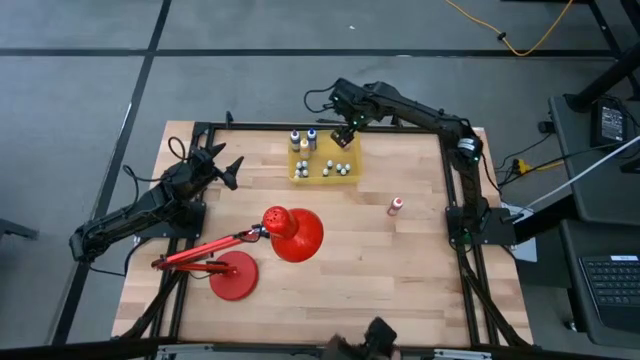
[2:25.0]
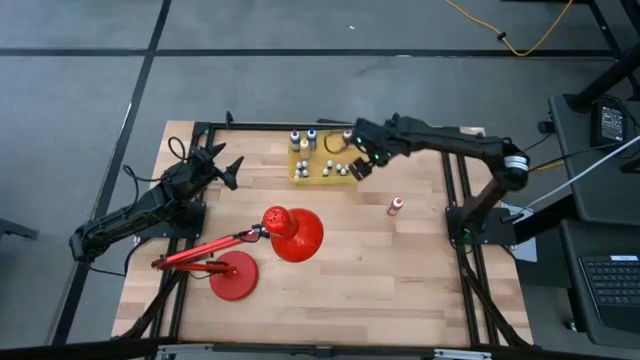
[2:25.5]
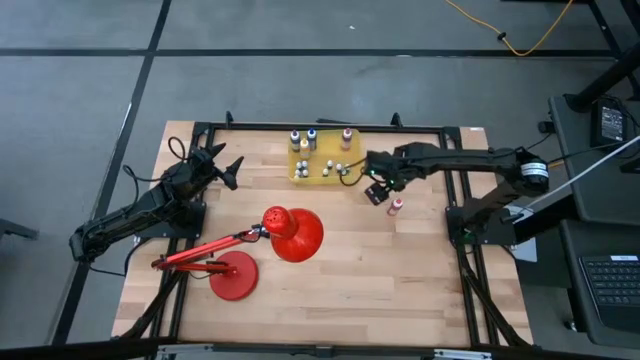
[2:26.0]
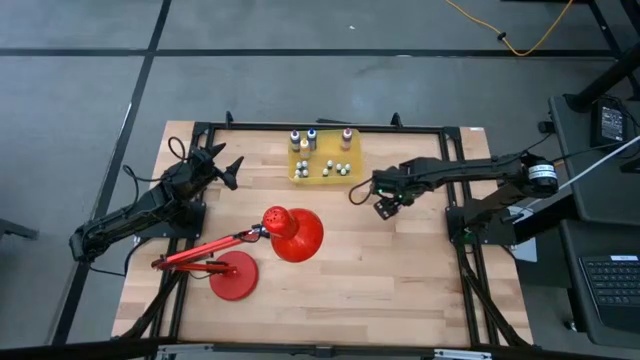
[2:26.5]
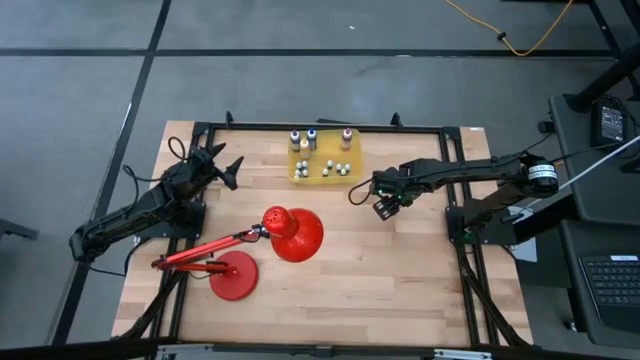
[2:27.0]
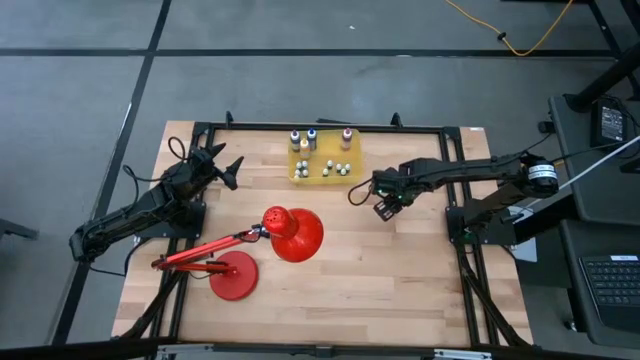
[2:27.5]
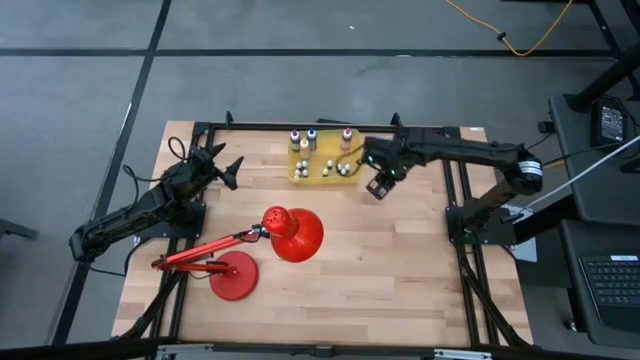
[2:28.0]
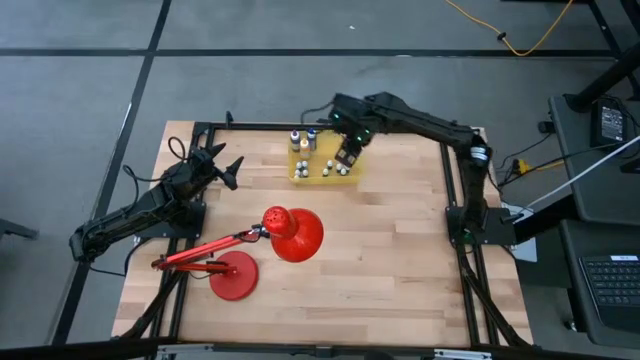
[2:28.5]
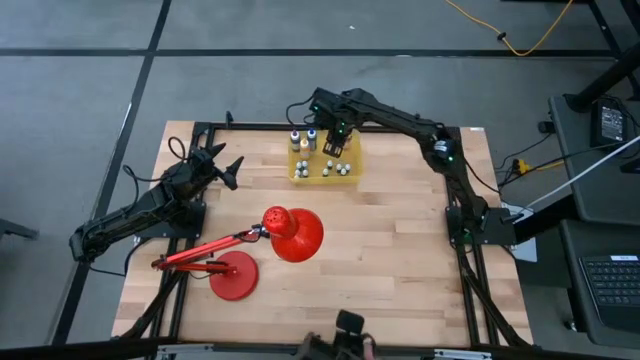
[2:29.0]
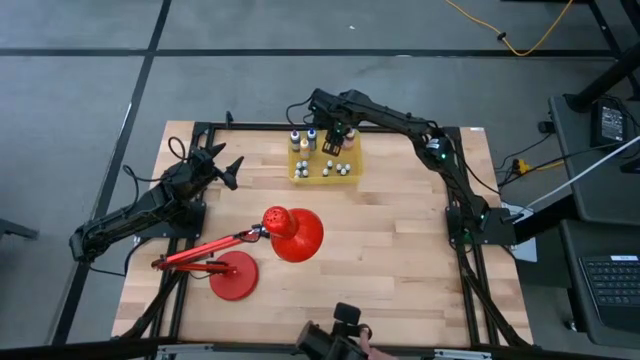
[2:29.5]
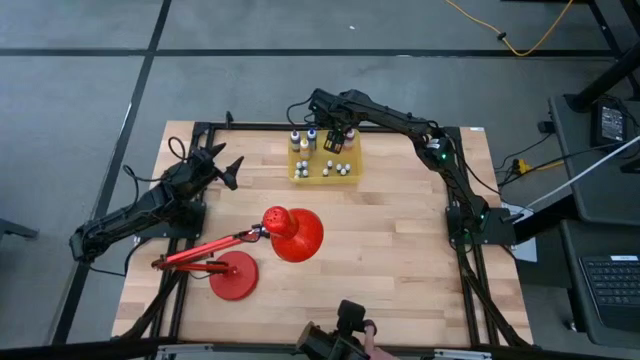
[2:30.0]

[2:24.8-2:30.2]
Task: Pick & Place food coloring
Put the orange food coloring bottle into the yellow bin

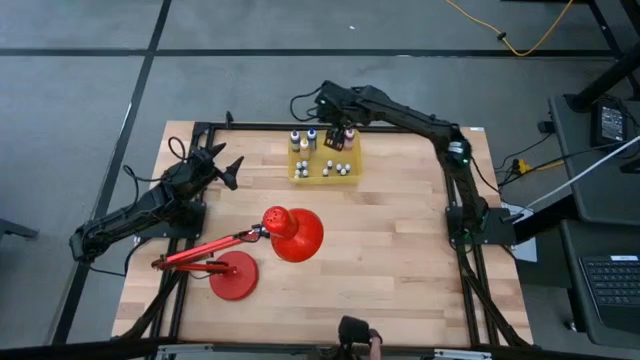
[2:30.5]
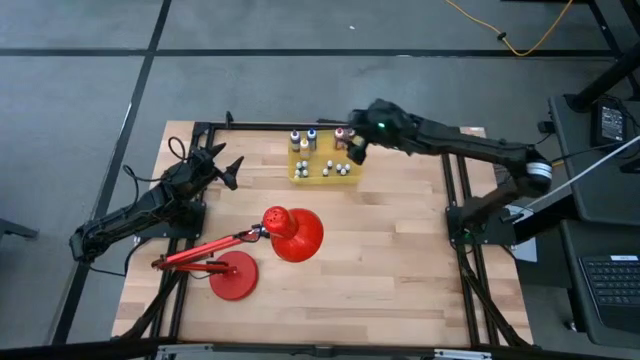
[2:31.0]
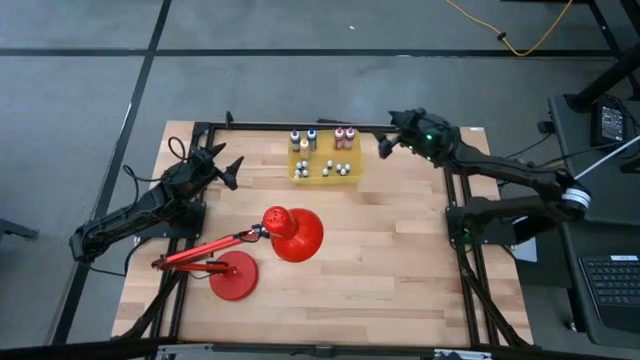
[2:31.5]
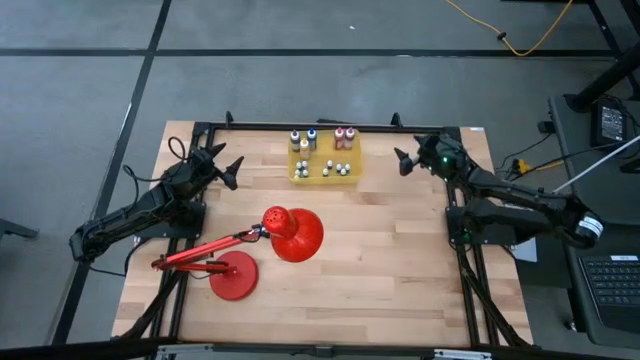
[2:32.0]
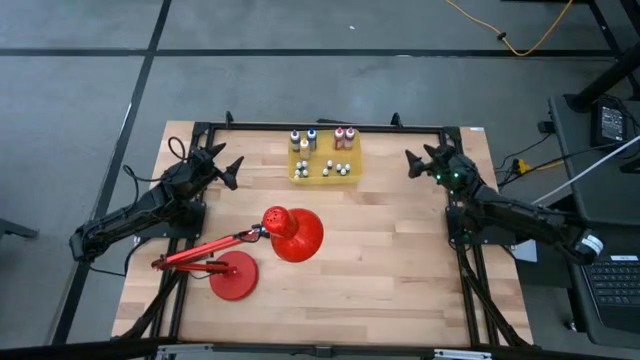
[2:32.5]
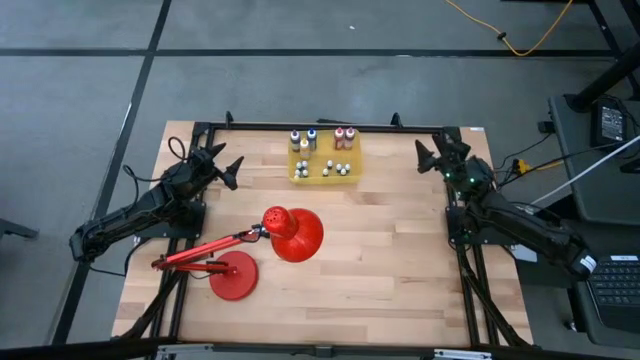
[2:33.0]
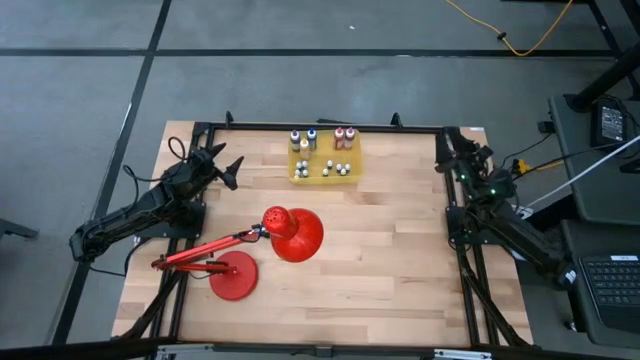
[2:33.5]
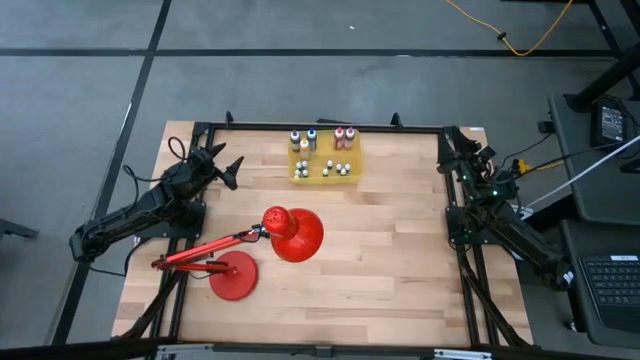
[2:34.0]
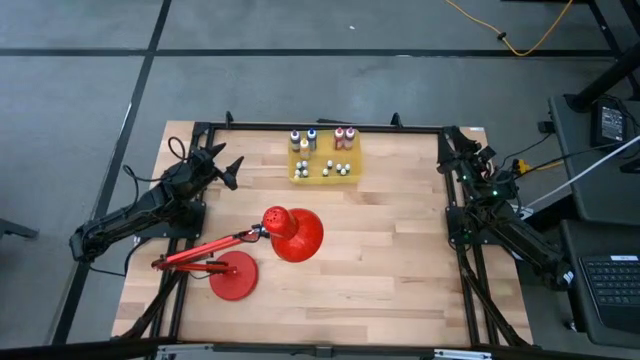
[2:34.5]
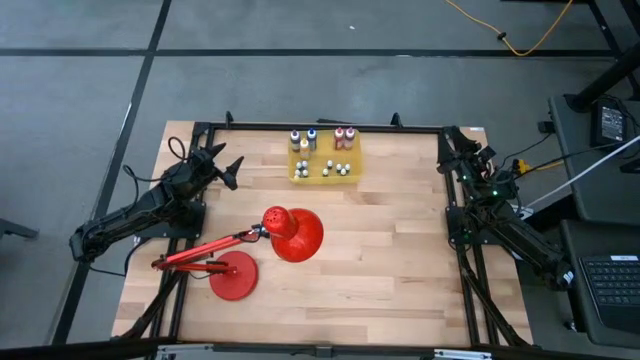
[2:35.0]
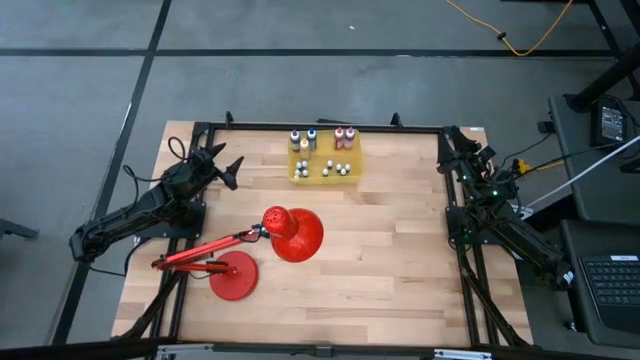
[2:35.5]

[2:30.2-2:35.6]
Return to Home Position

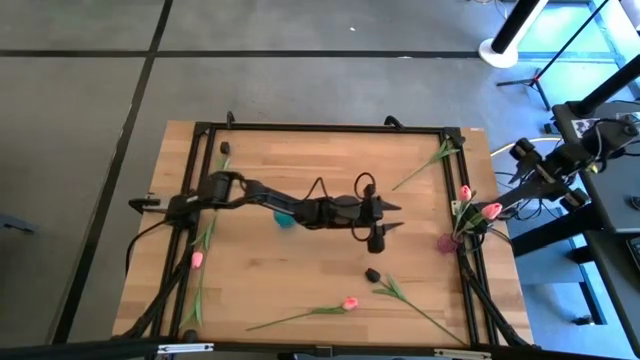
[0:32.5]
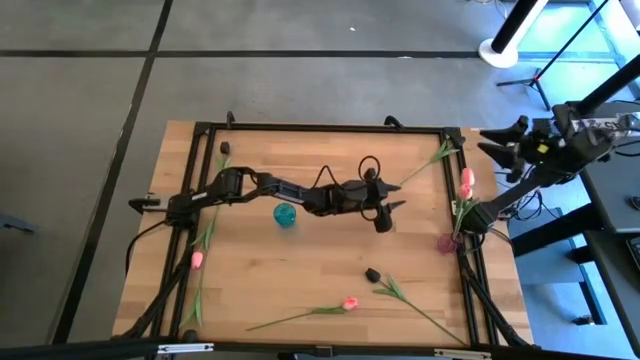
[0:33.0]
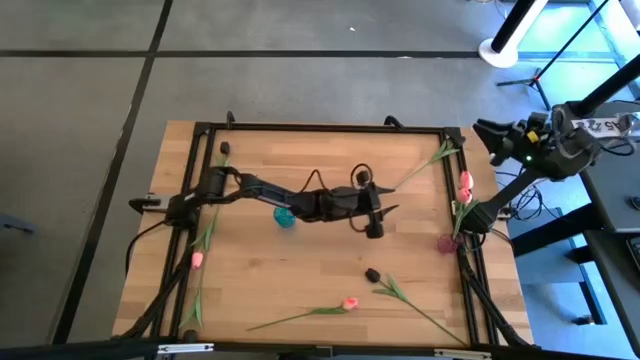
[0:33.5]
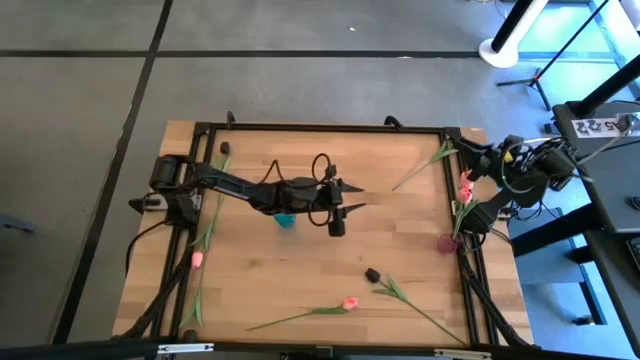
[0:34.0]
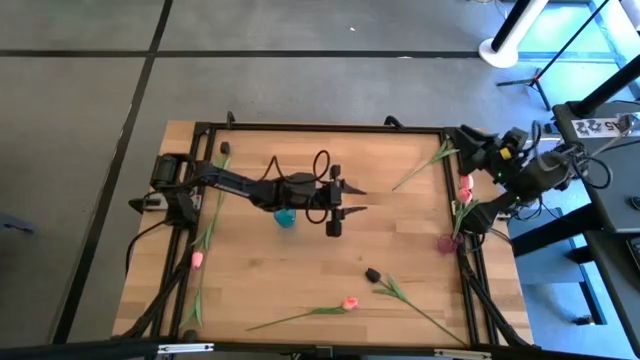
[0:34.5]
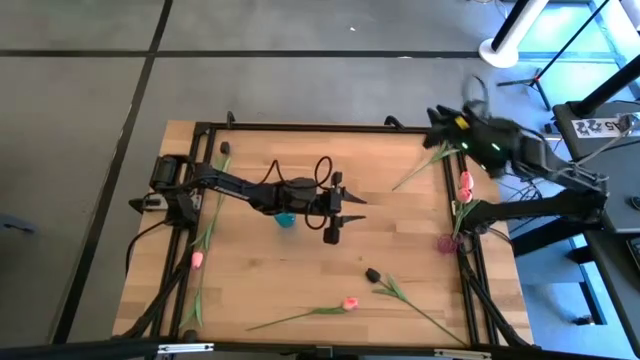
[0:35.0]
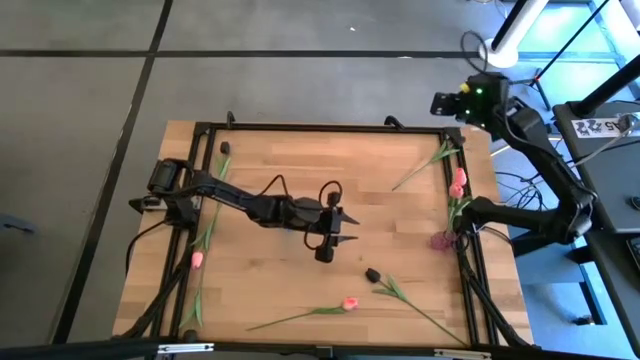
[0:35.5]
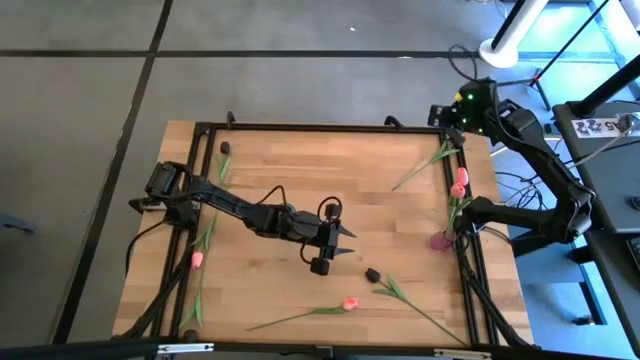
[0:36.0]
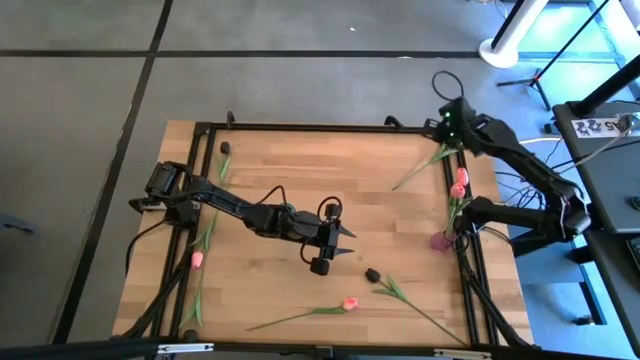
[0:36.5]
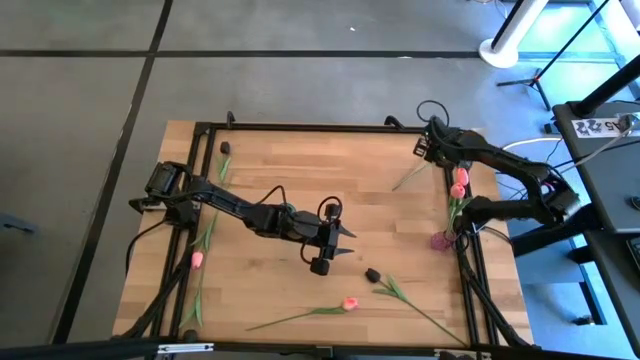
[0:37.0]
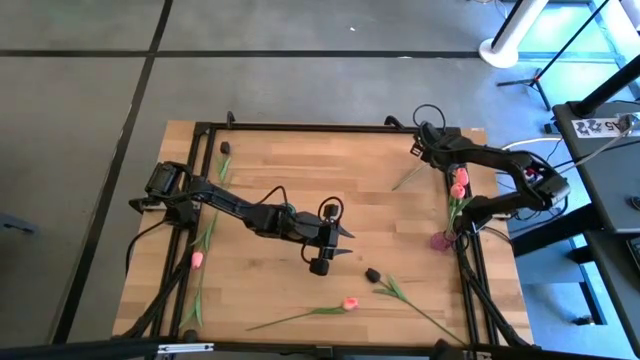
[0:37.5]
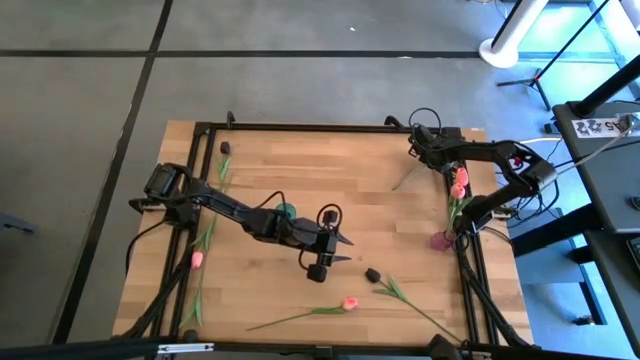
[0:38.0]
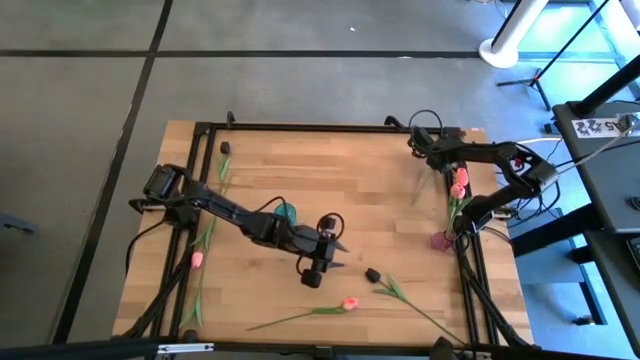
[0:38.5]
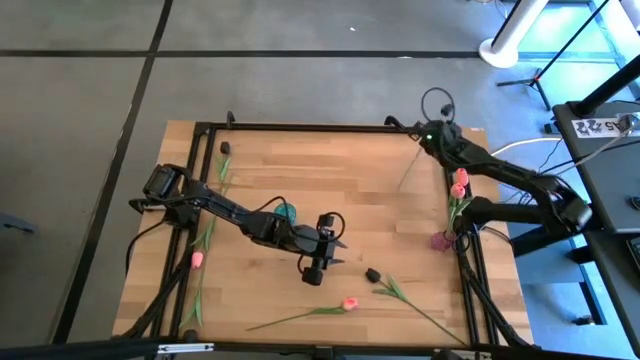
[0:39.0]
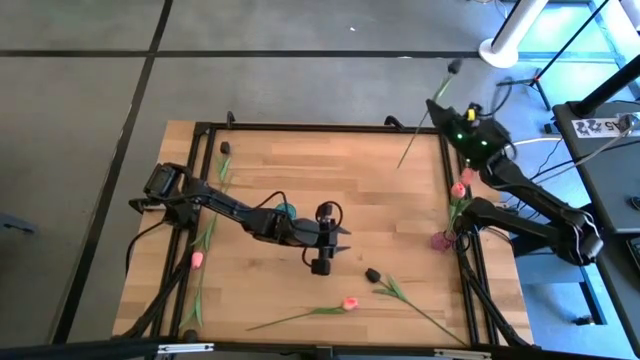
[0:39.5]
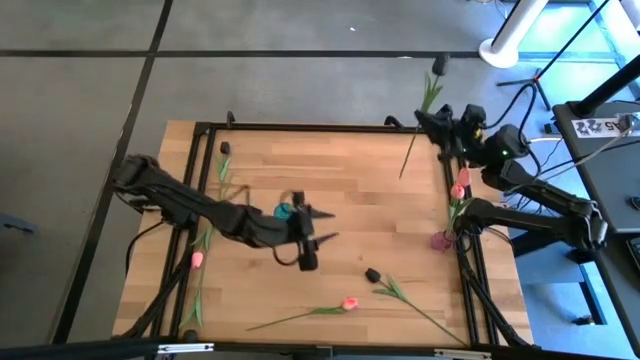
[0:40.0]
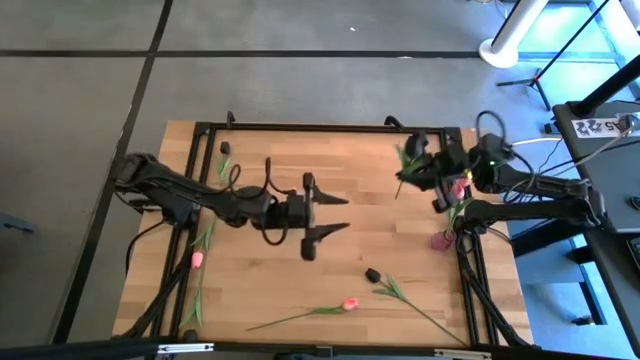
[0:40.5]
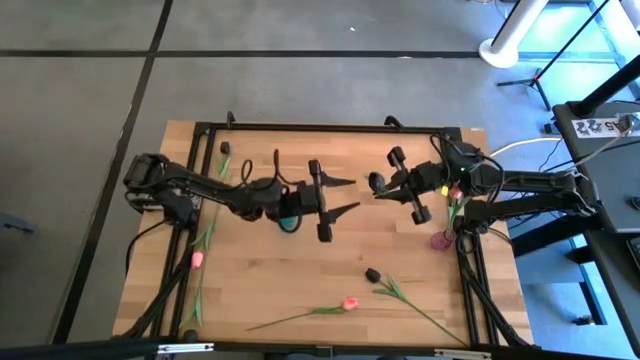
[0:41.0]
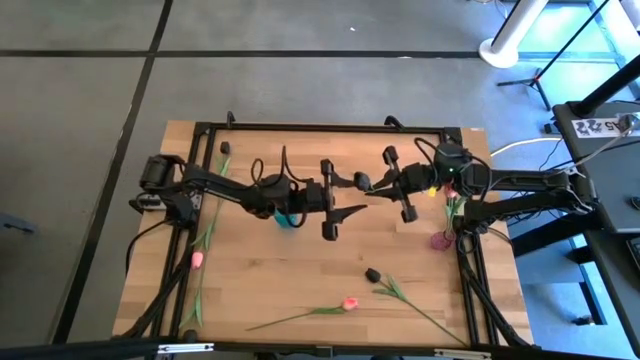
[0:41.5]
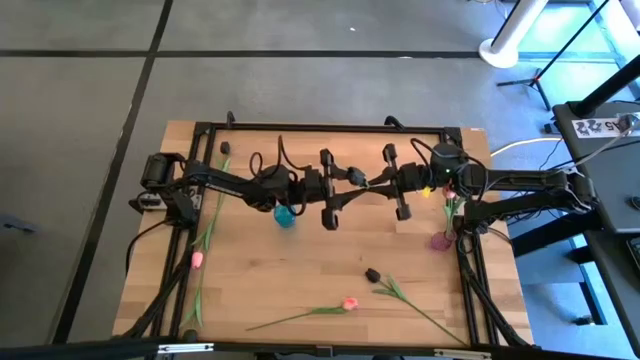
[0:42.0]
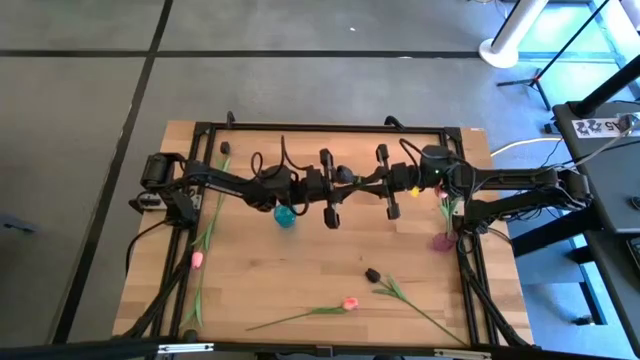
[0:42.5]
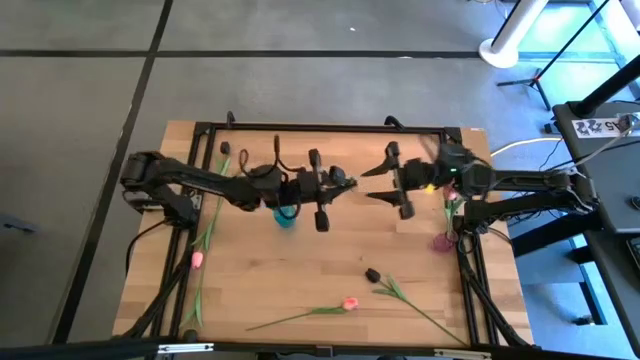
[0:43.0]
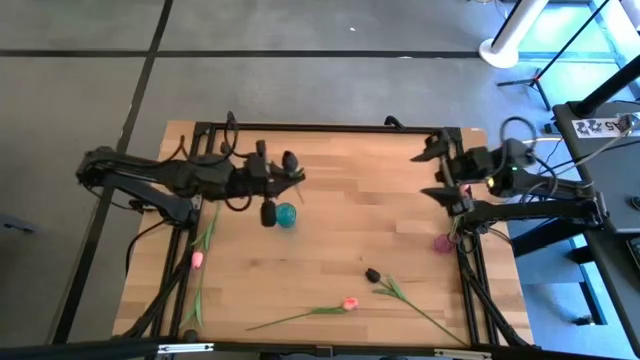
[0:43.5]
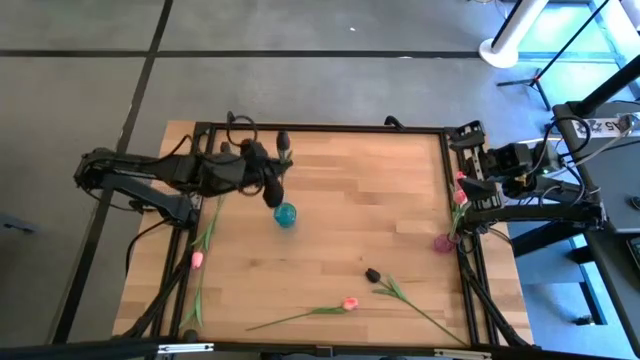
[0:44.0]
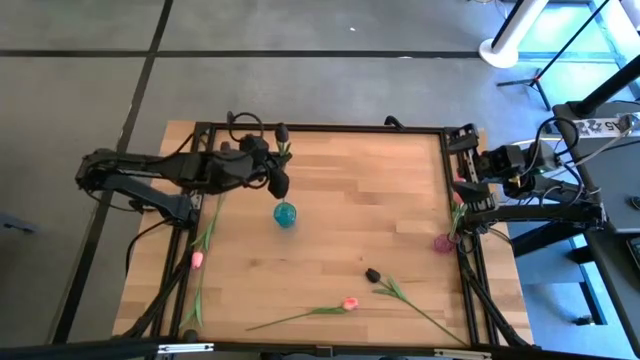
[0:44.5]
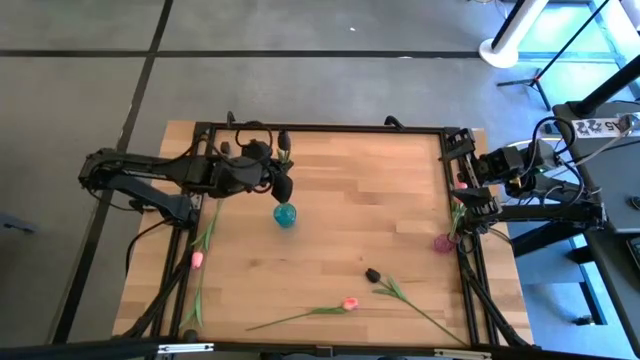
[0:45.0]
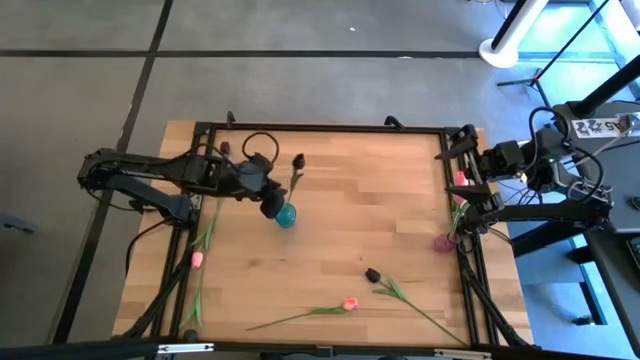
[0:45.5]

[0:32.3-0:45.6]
Task: Sort flowers into vase by color
Put the black tulip into the blue vase
